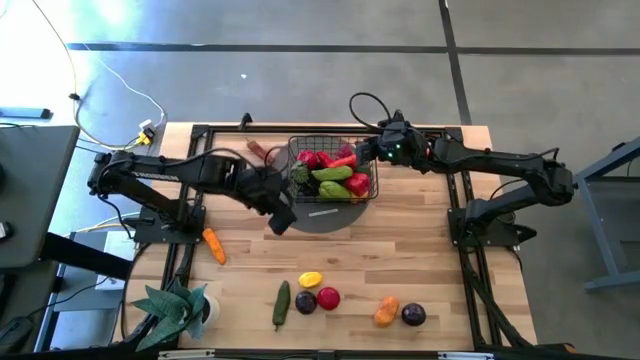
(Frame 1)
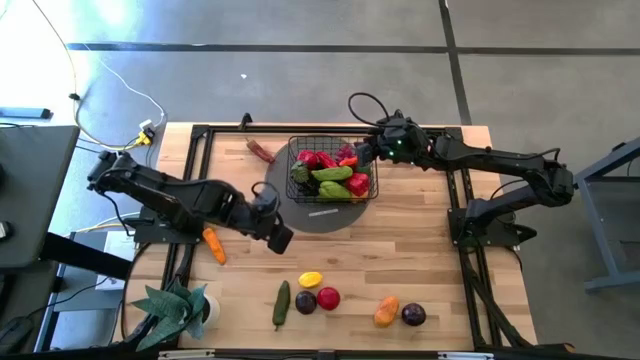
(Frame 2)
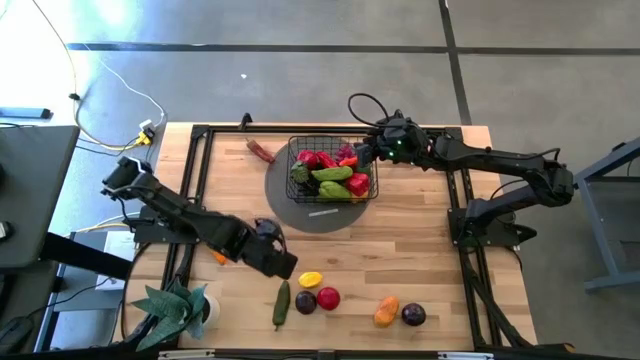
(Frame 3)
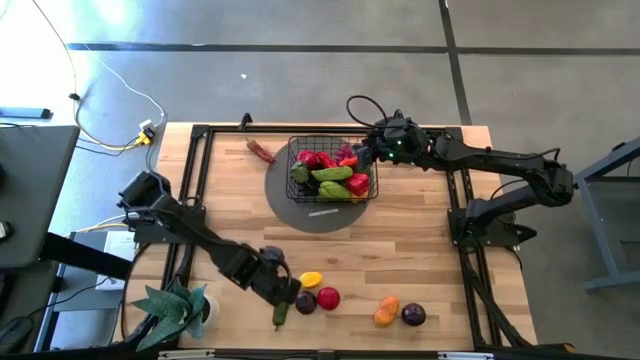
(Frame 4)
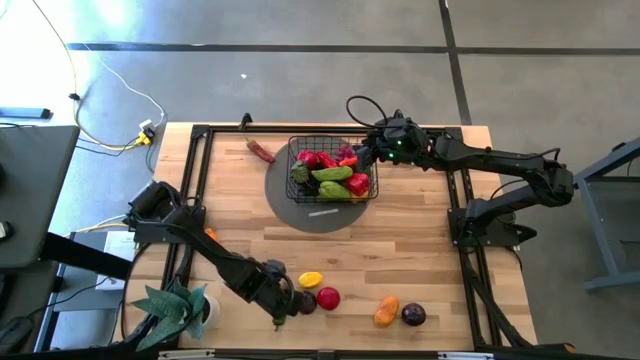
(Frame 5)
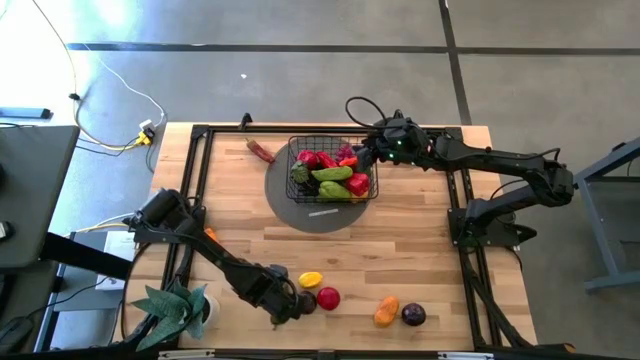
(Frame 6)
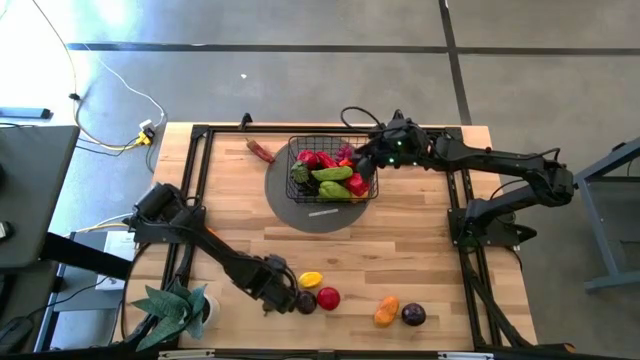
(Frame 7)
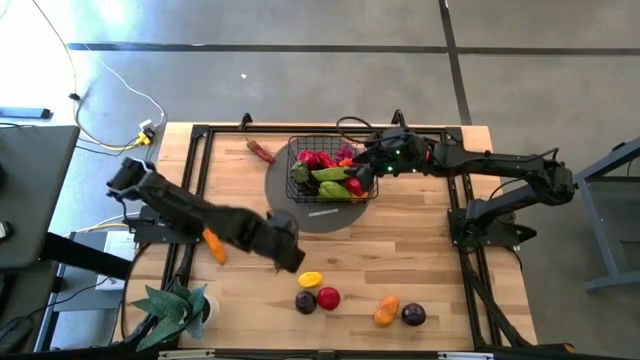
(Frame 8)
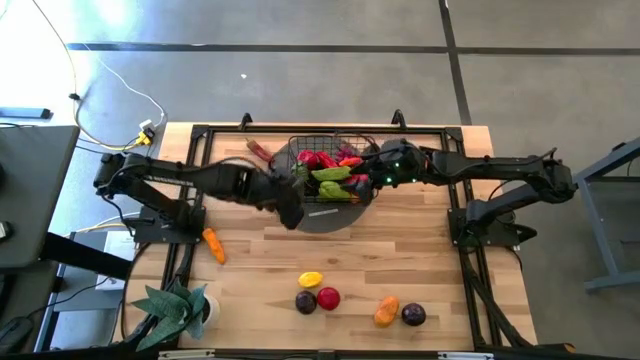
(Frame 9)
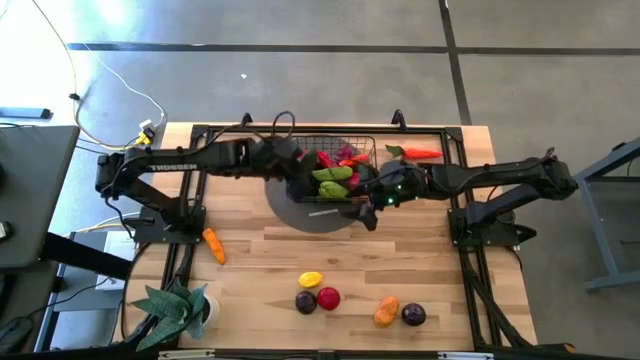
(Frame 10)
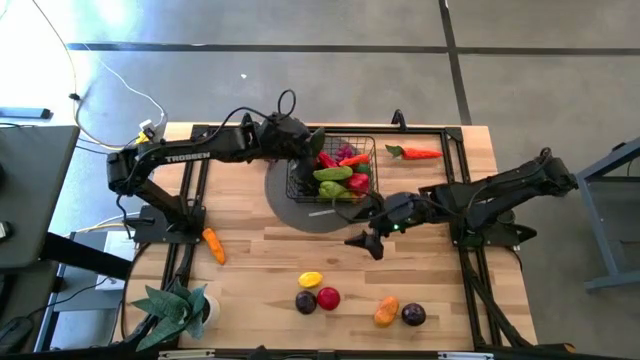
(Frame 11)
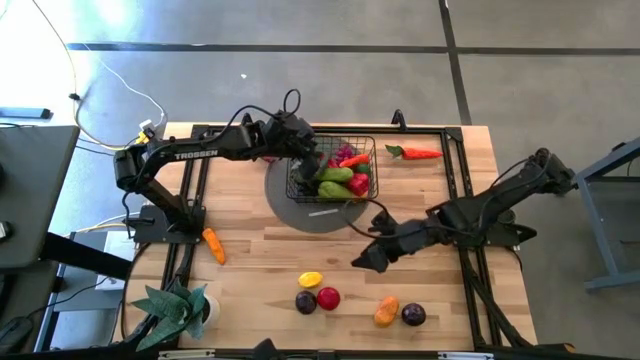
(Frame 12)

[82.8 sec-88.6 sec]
Task: Build produce basket
Put the green chili pepper into the black mesh basket

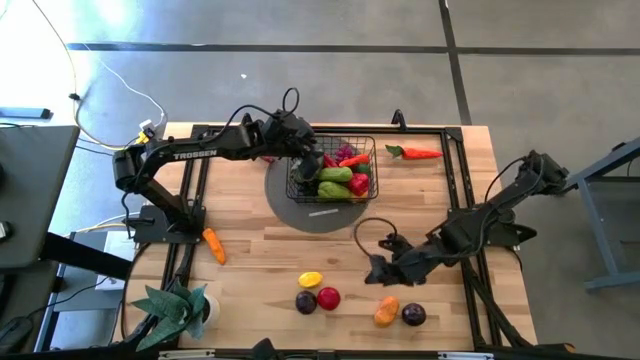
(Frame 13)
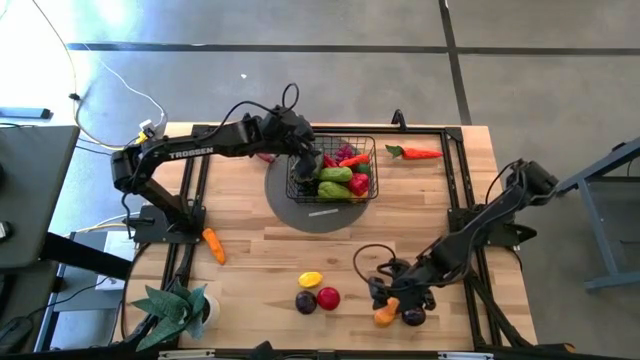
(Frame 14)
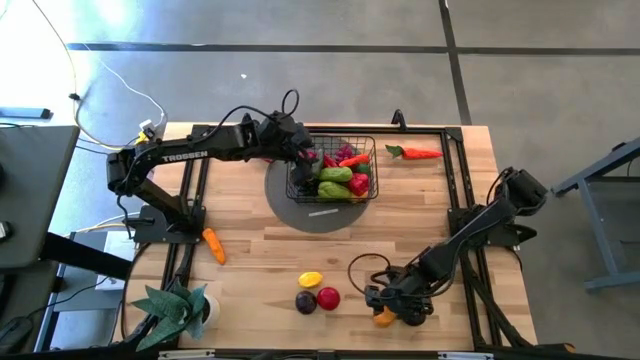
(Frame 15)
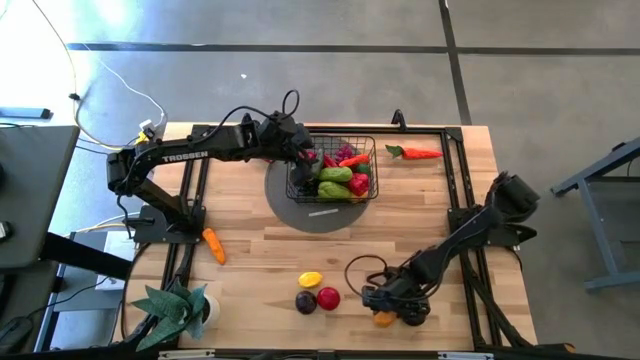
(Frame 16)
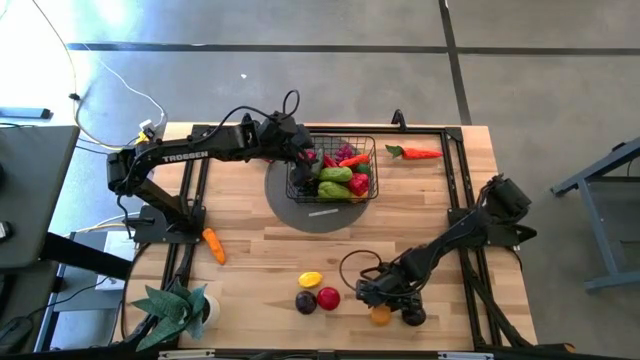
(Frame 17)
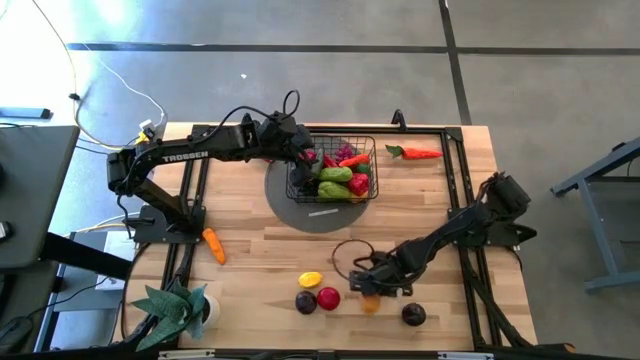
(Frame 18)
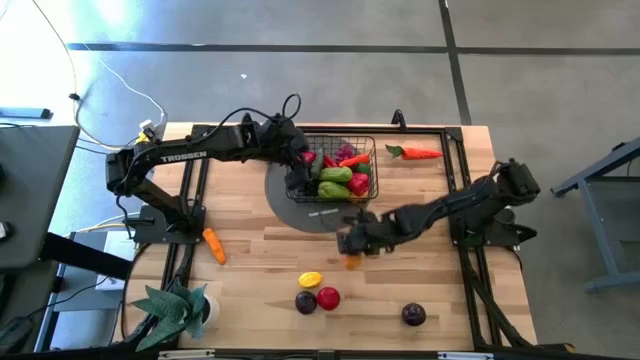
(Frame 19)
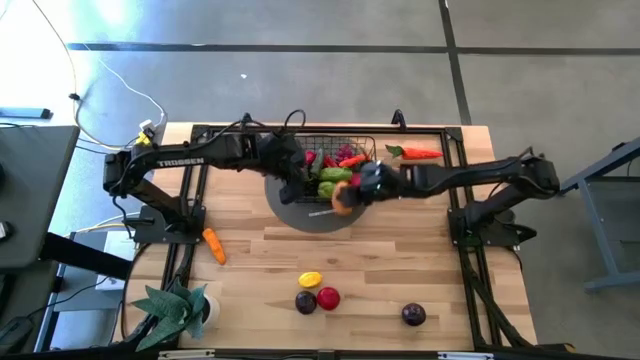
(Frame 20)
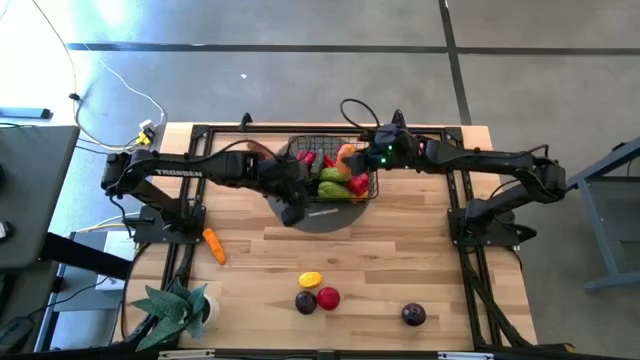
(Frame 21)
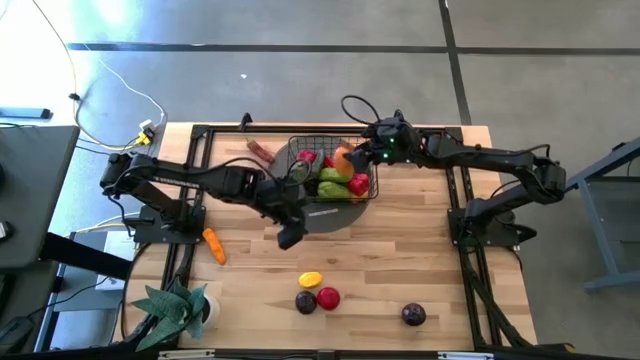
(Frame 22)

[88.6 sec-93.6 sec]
Put the yellow mango into the black mesh basket

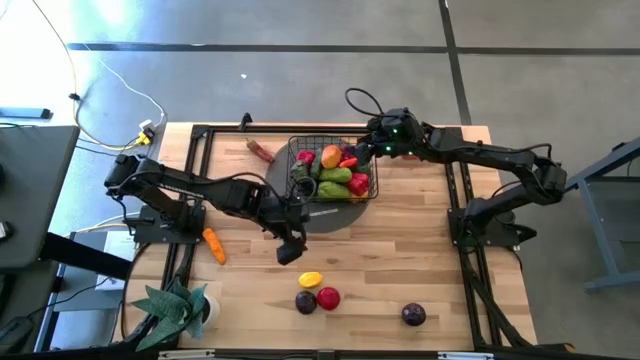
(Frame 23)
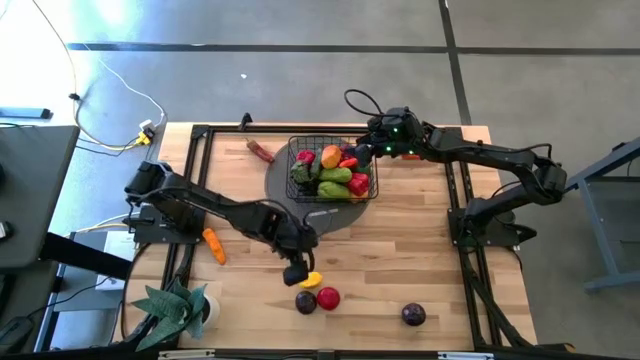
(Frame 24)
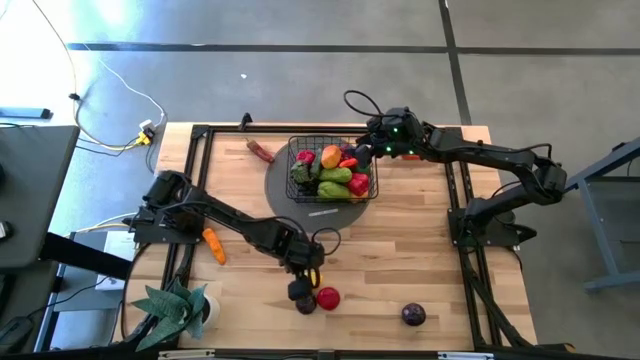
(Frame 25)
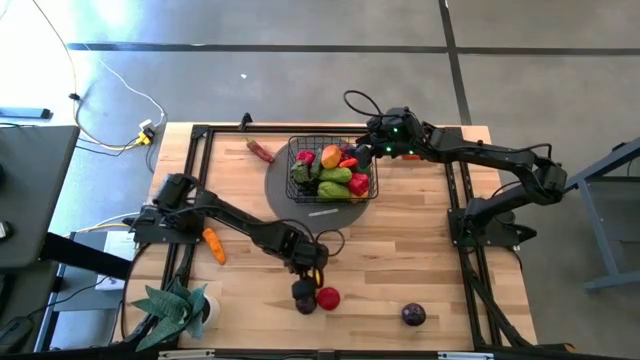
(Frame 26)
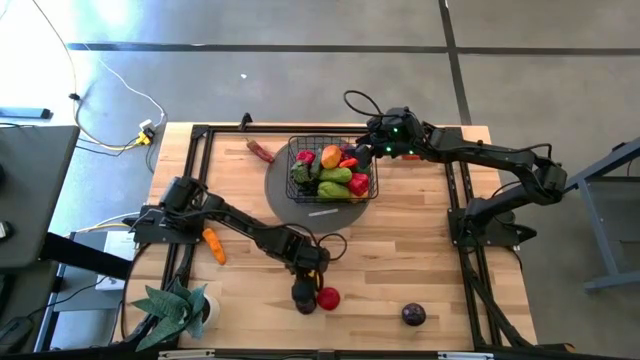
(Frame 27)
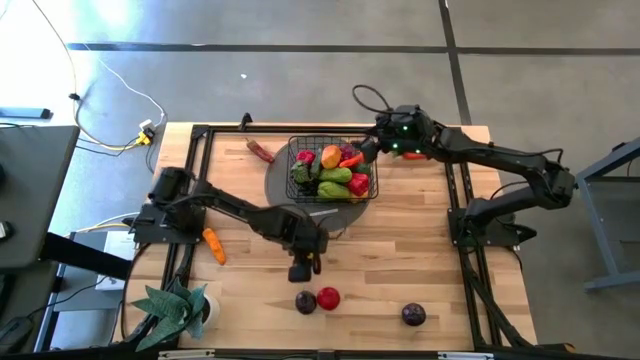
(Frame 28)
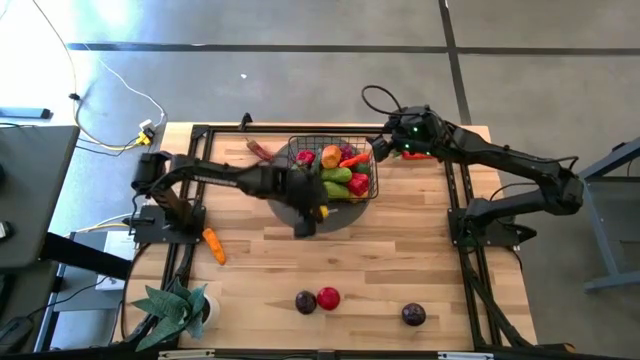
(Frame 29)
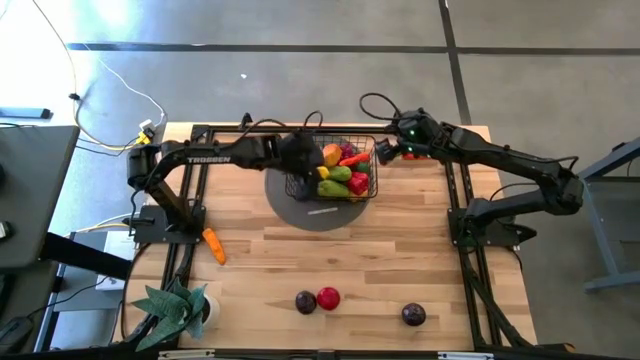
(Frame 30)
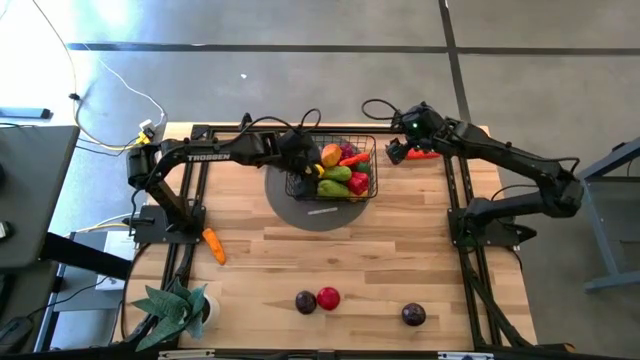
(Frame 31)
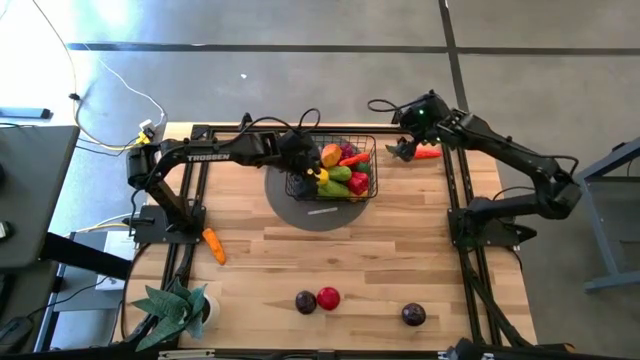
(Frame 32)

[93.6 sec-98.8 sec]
Put the yellow lemon into the black mesh basket

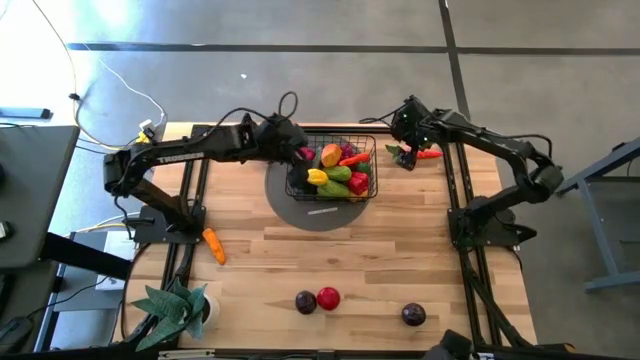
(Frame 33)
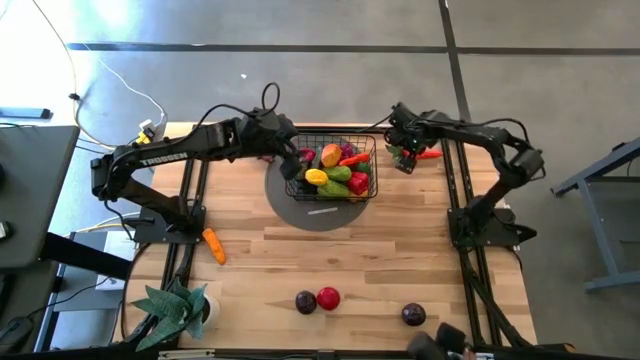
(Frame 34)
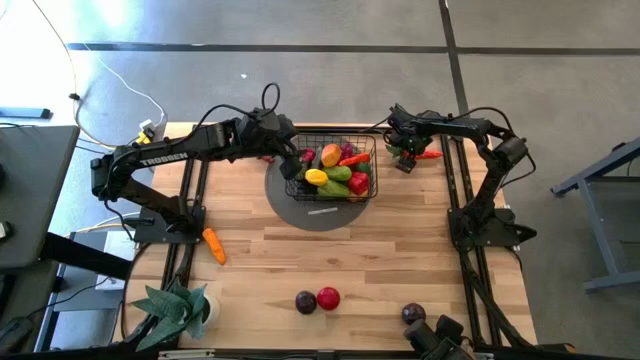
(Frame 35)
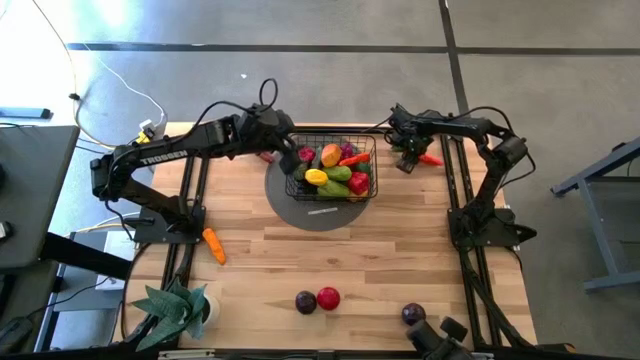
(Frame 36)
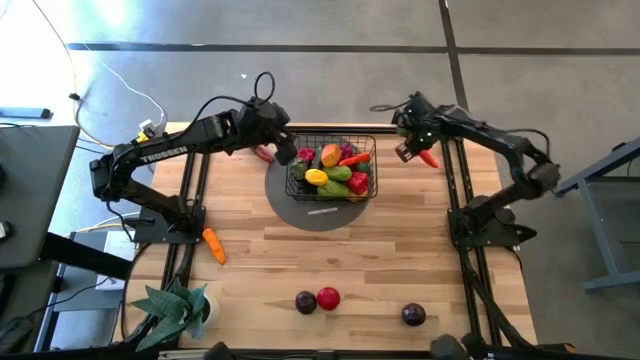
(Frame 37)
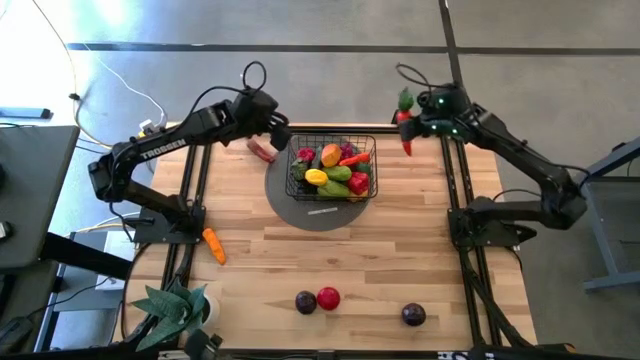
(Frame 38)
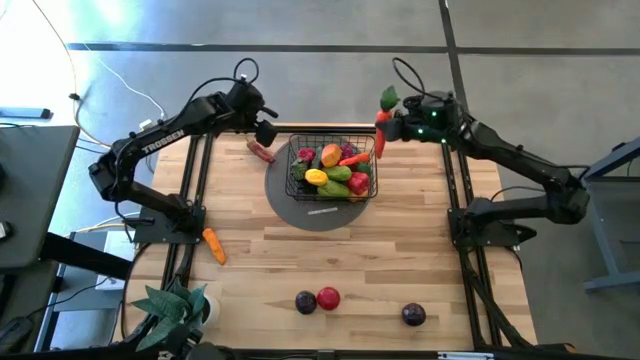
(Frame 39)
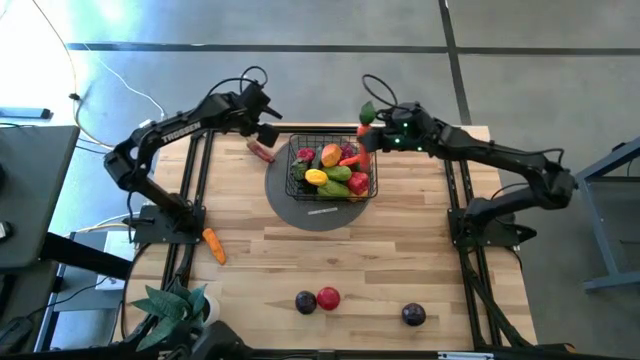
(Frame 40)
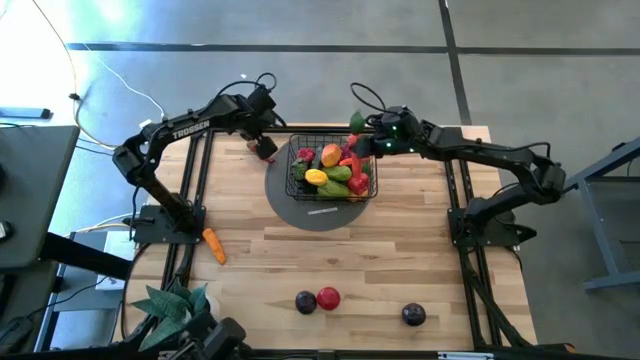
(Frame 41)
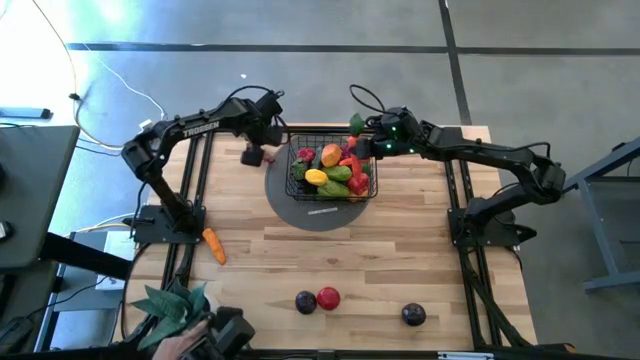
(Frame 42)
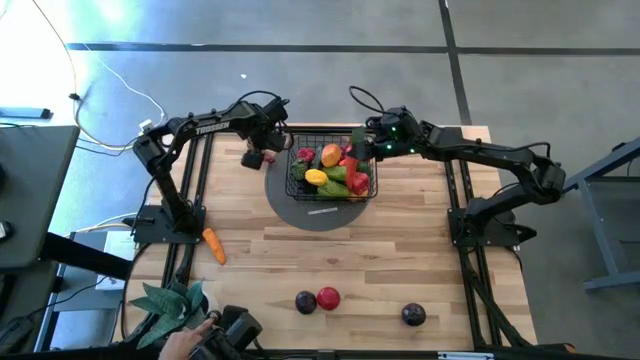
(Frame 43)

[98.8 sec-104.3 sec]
Put the orange carrot into the black mesh basket
